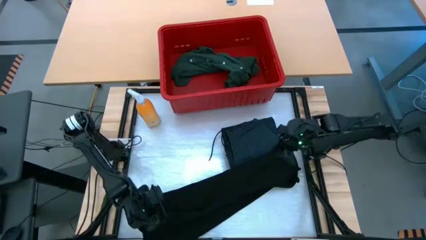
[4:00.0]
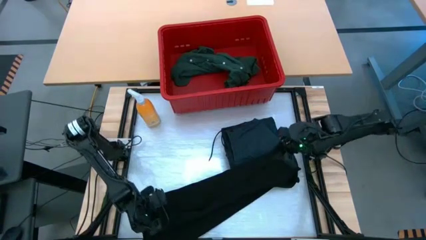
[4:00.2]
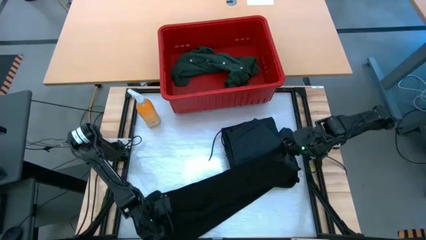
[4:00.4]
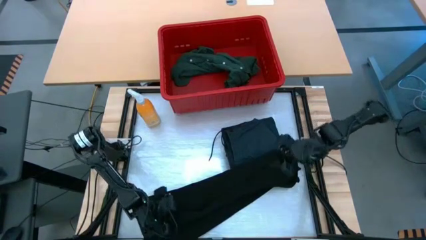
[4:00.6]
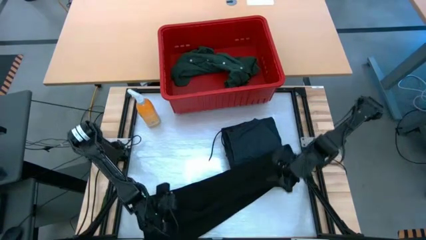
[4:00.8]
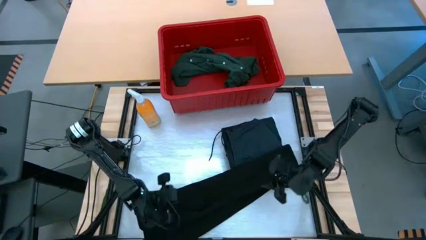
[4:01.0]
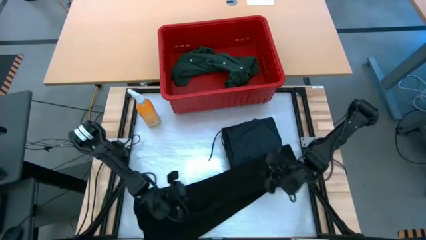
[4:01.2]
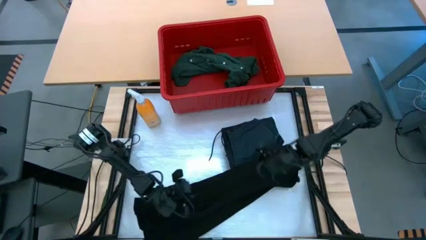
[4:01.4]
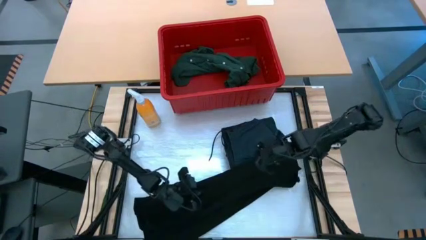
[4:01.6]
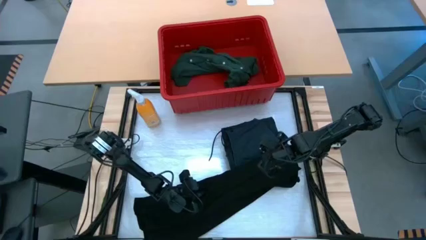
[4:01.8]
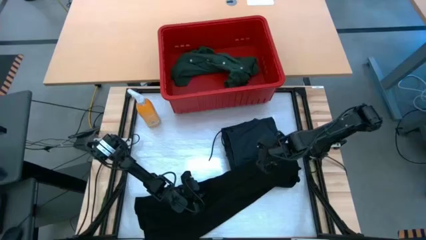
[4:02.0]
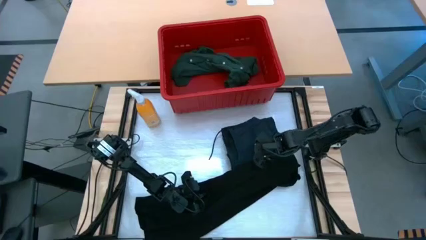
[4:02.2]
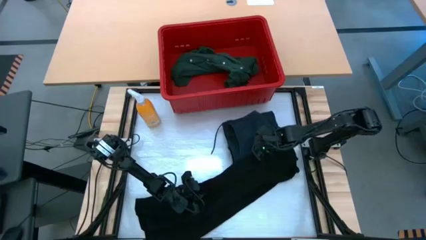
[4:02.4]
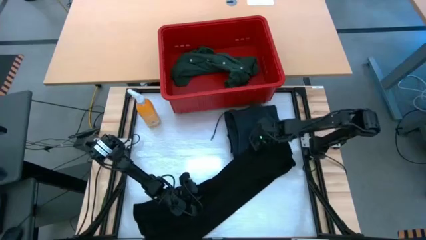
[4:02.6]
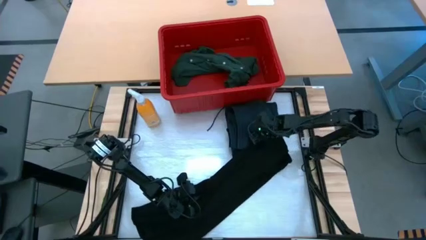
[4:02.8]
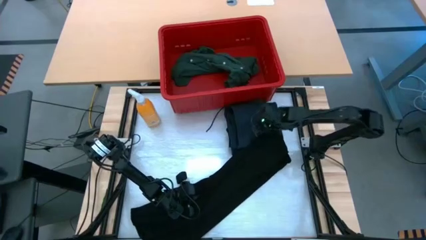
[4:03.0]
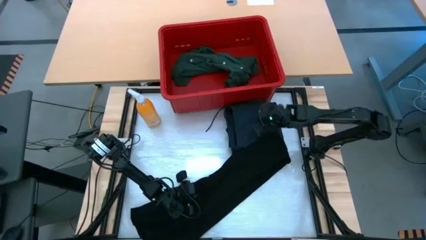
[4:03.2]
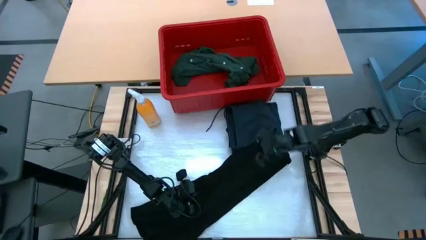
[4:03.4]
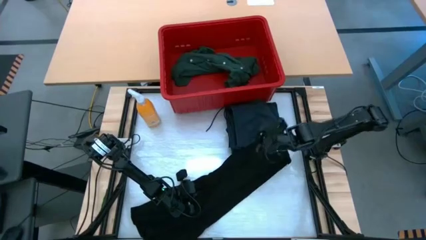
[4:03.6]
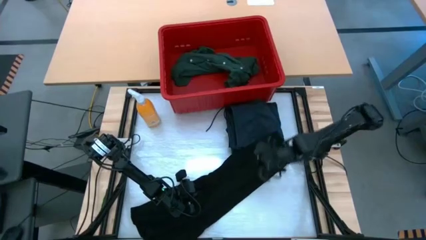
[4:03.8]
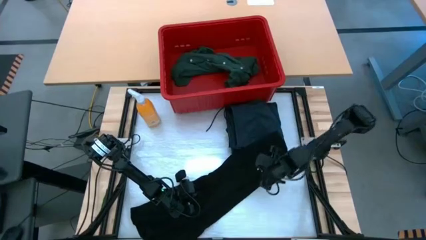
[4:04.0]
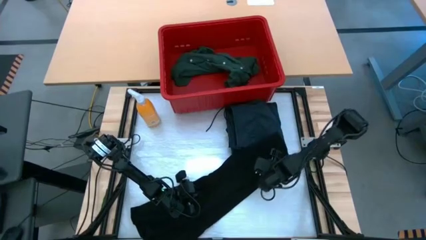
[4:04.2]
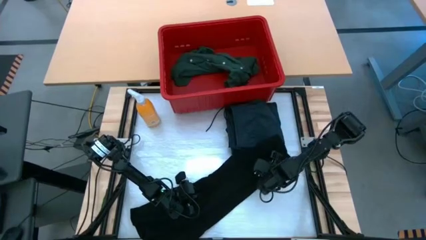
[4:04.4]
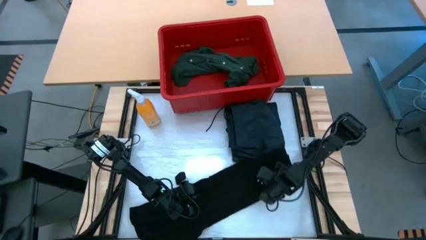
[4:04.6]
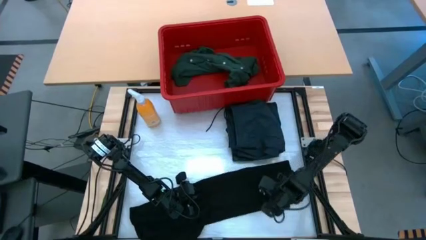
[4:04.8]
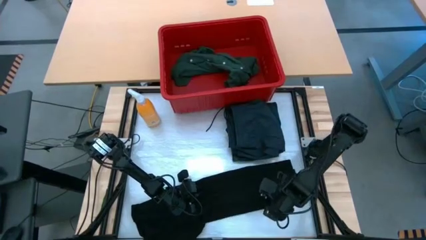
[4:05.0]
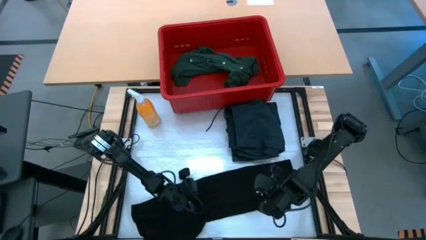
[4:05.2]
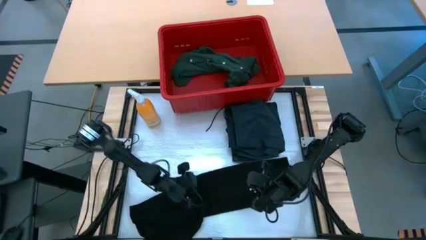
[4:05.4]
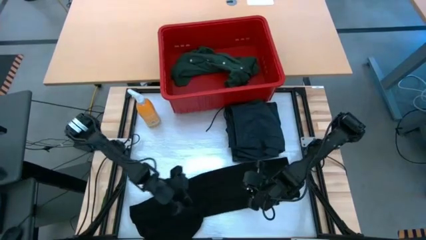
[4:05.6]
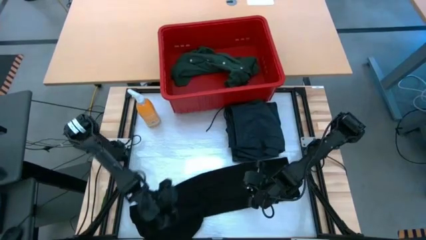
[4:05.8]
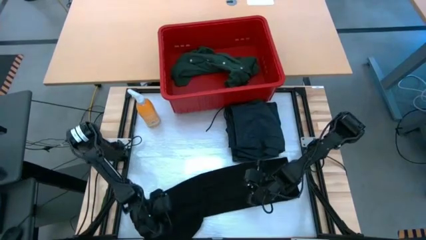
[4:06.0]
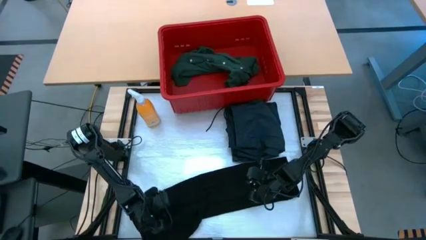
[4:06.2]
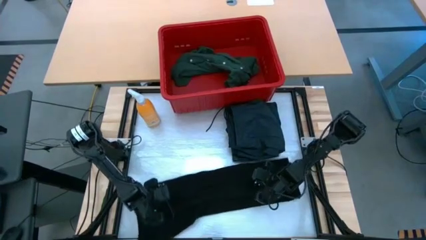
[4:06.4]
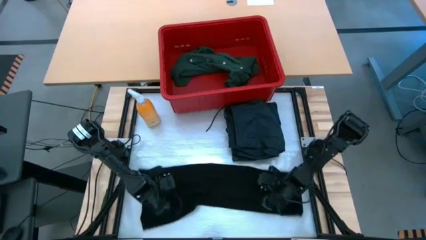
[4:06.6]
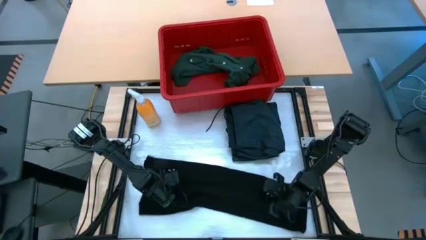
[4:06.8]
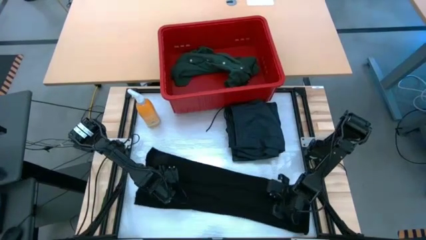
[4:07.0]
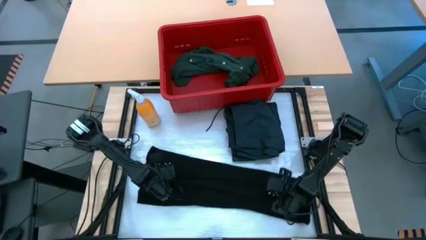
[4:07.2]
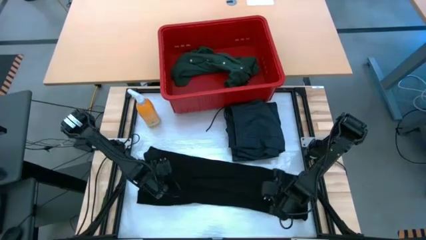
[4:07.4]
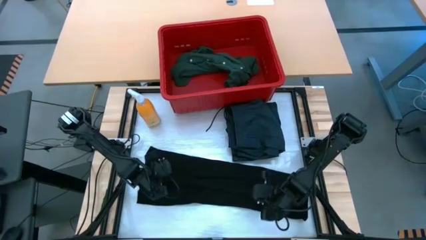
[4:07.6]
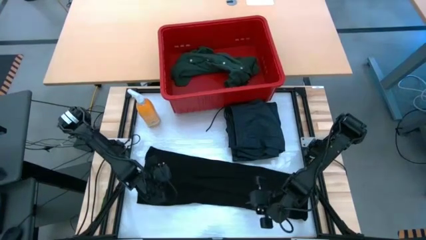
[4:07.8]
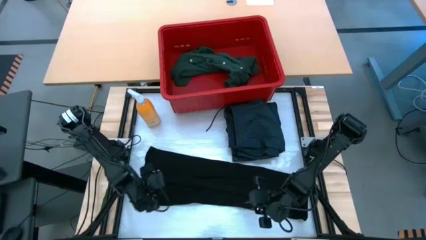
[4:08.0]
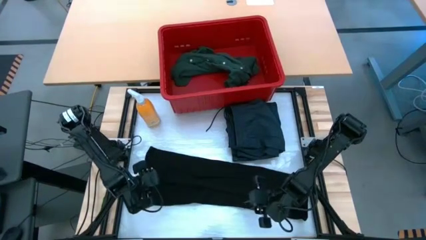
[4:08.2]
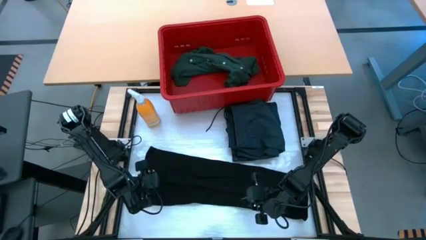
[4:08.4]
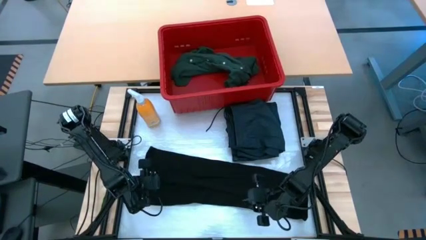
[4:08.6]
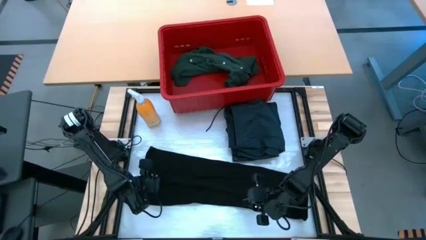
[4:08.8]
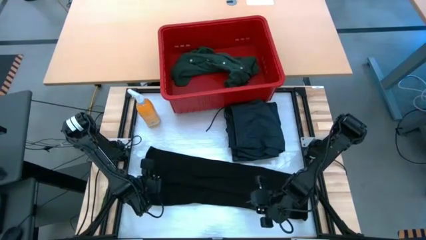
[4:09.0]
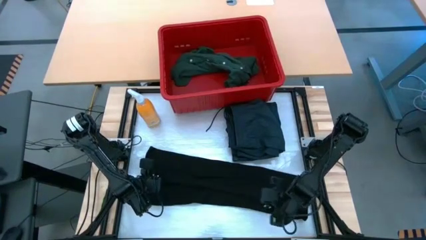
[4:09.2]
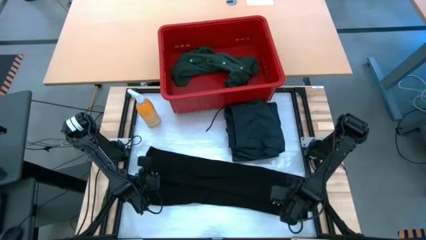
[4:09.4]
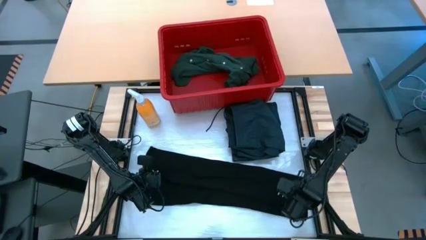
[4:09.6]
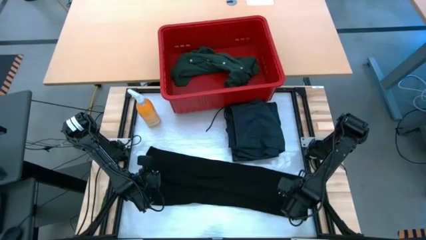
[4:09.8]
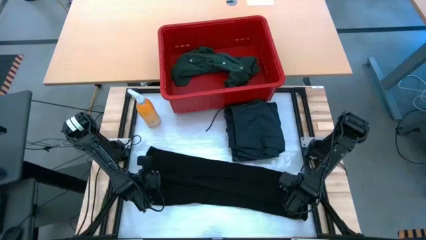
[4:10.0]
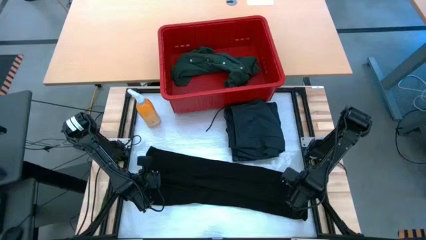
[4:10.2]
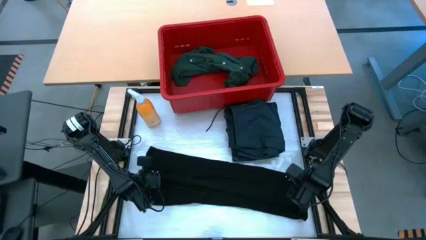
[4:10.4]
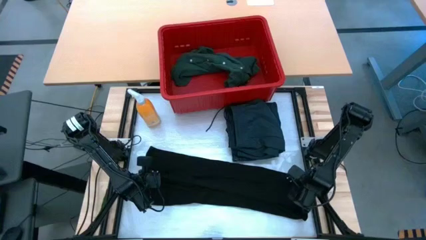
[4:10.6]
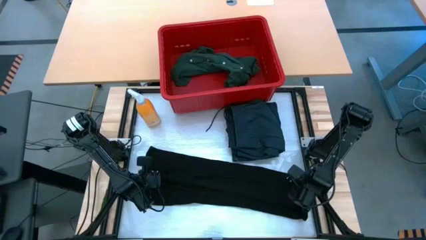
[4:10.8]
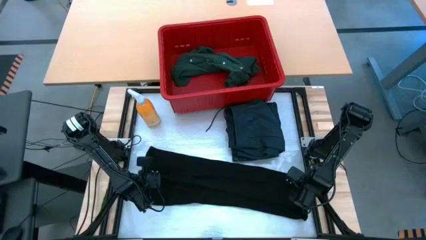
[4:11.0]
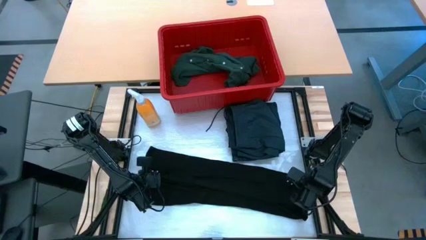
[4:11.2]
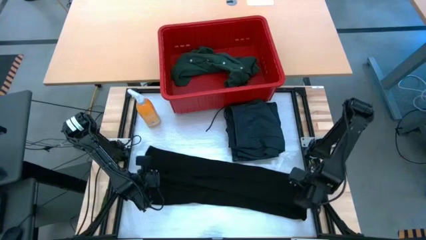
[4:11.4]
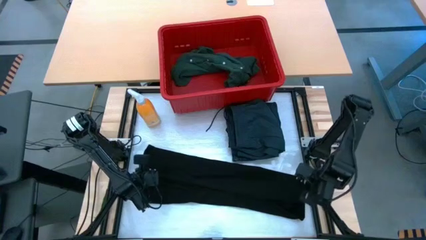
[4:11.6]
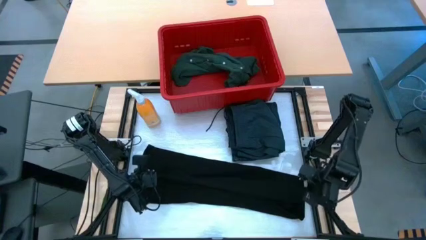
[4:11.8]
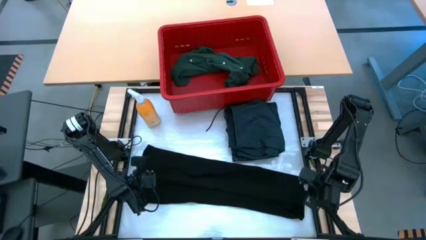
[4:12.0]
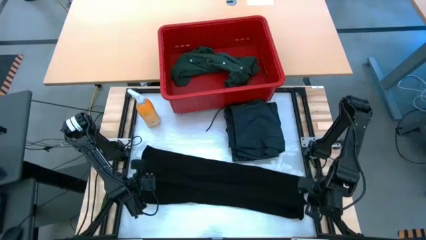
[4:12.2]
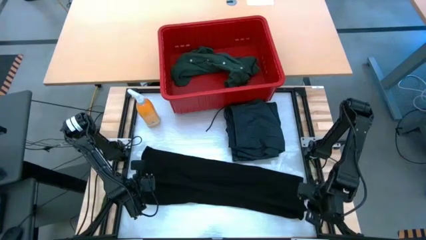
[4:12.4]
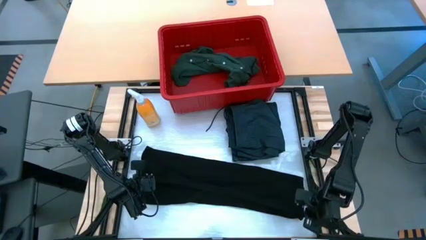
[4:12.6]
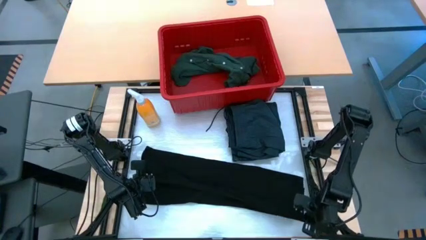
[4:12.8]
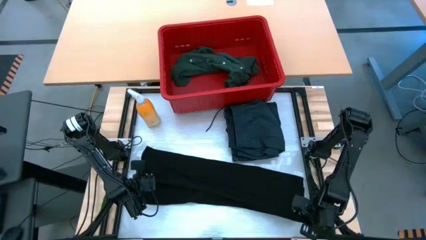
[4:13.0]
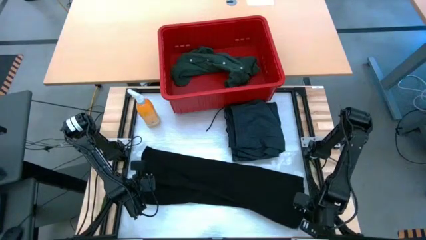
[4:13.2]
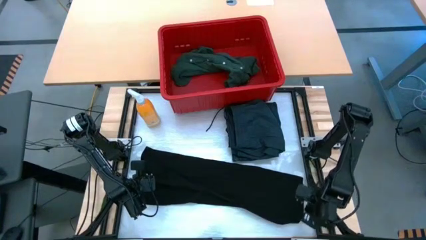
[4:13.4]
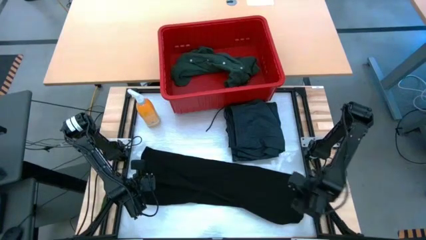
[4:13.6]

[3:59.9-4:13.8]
Task: Fold Laundry from Bin
Fold the black shirt

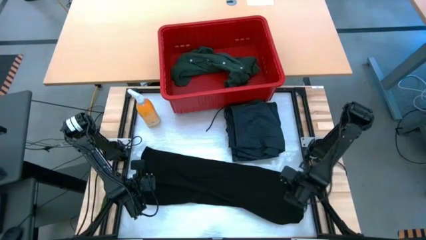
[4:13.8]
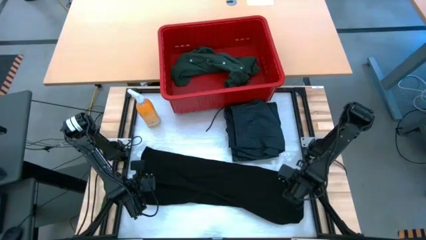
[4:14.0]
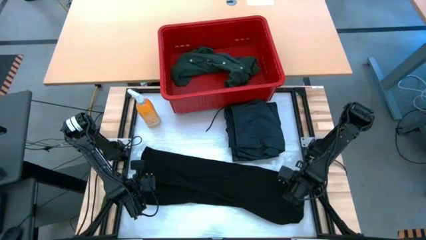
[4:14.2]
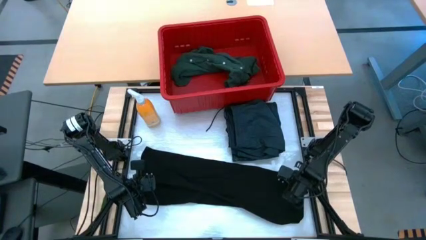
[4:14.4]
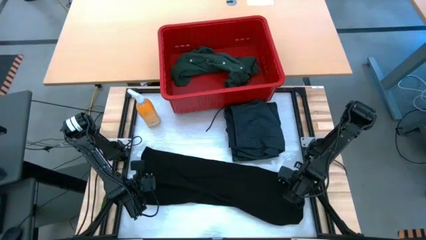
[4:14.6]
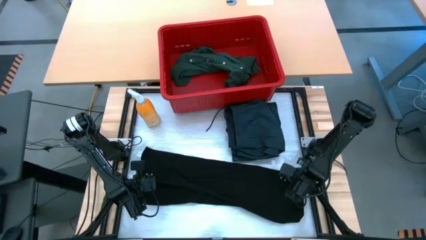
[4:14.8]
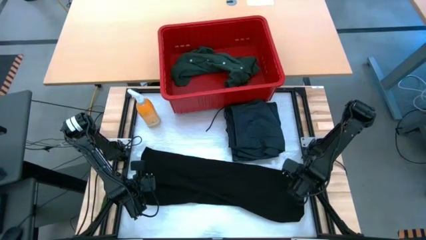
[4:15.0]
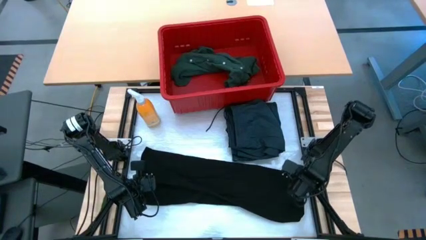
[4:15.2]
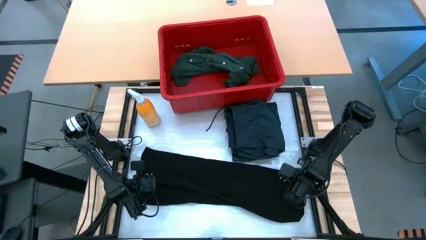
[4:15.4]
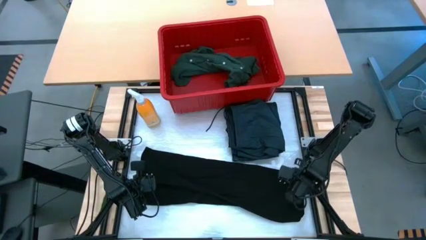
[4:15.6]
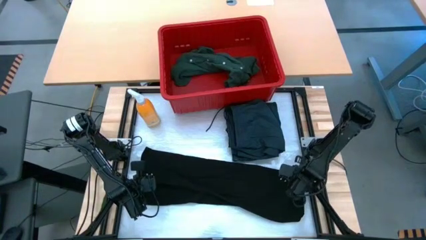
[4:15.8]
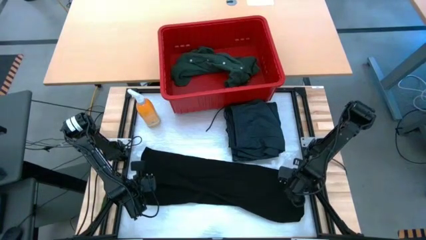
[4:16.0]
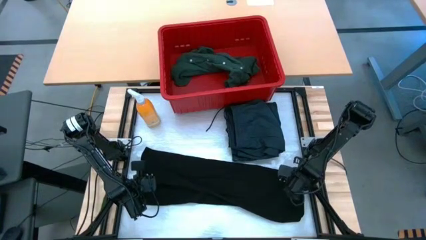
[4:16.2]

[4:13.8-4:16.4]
Fold the black shirt
